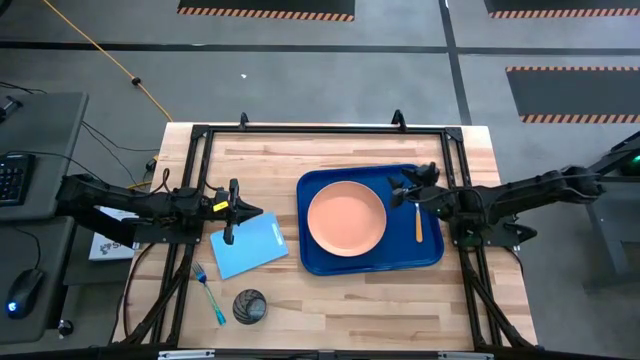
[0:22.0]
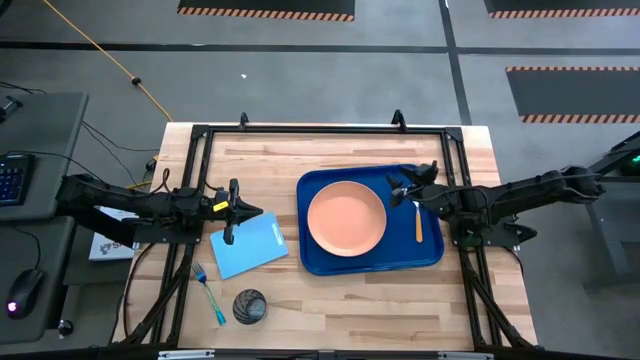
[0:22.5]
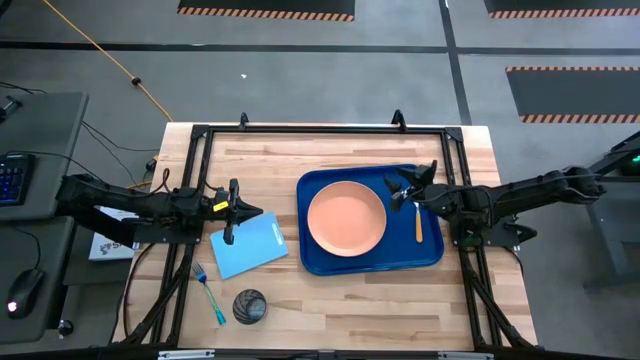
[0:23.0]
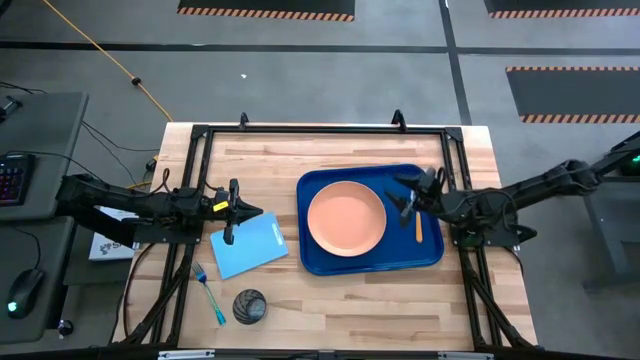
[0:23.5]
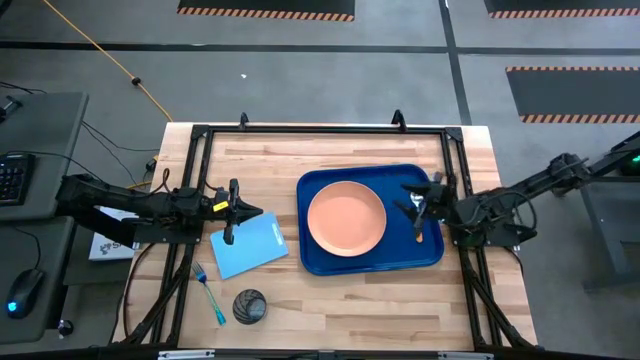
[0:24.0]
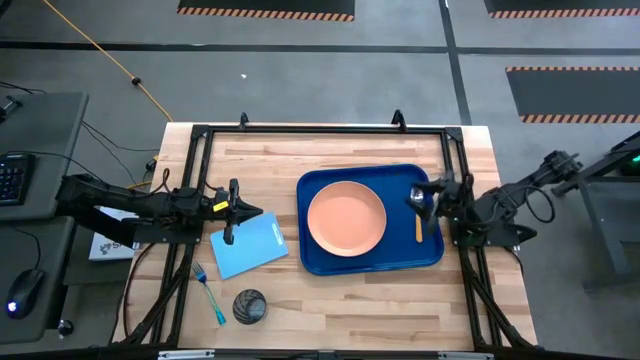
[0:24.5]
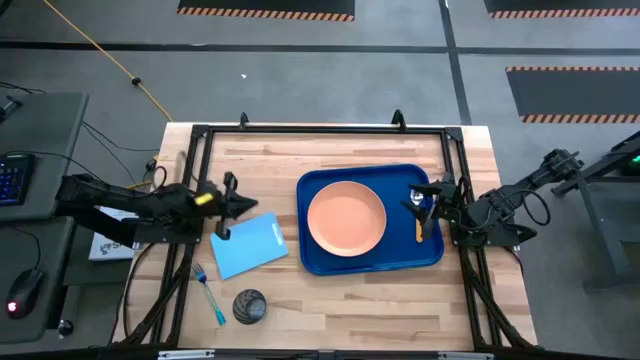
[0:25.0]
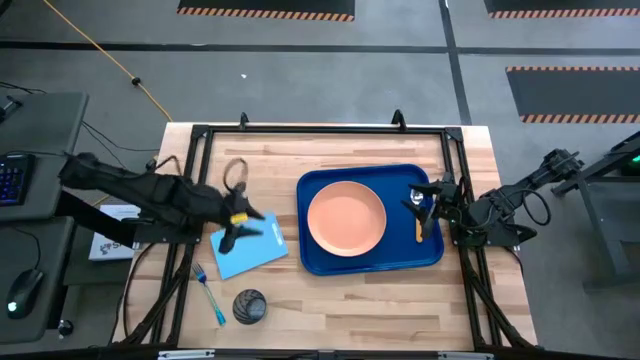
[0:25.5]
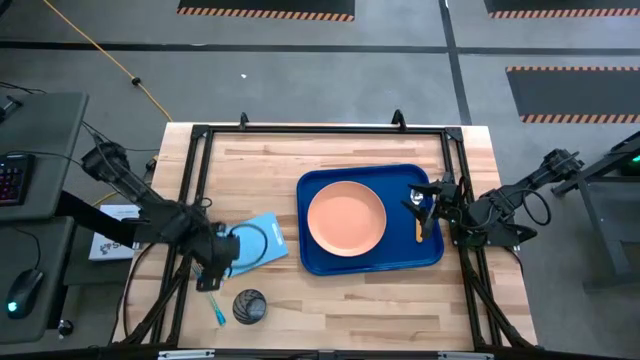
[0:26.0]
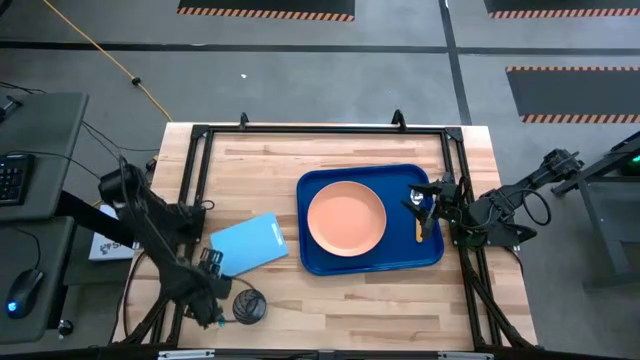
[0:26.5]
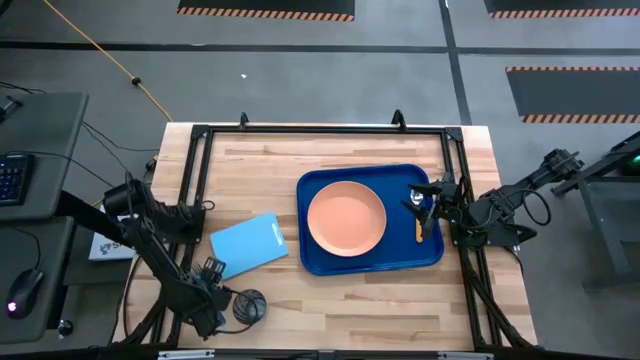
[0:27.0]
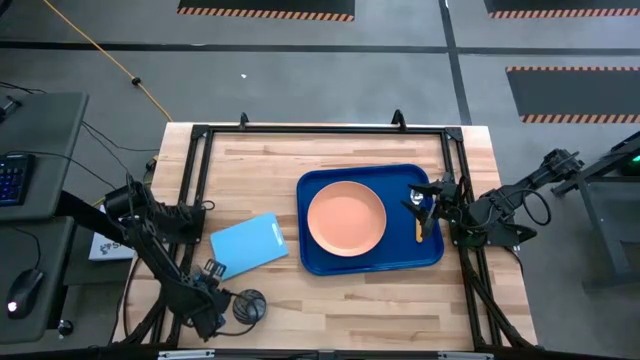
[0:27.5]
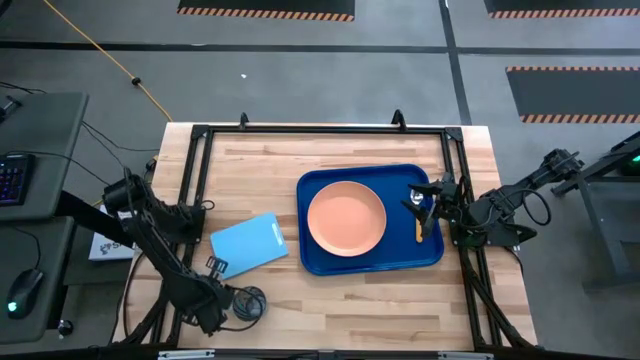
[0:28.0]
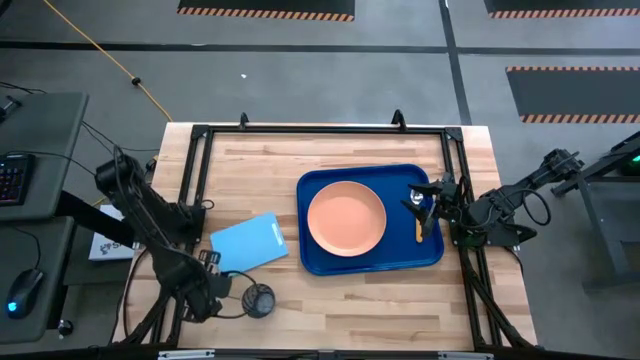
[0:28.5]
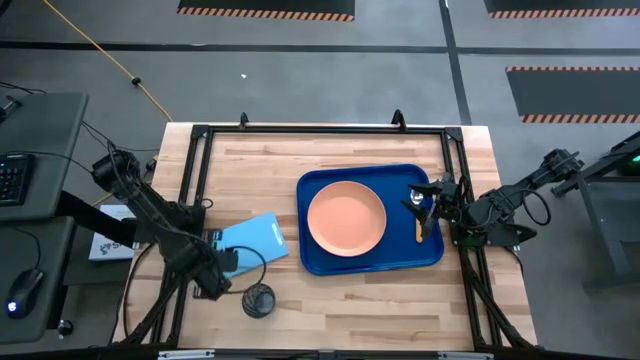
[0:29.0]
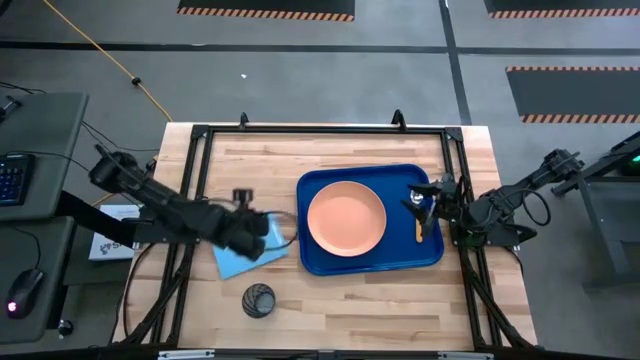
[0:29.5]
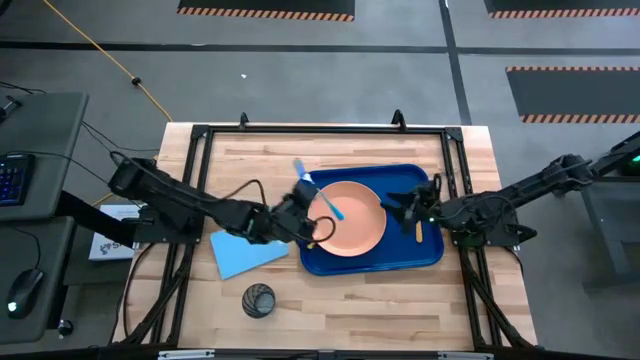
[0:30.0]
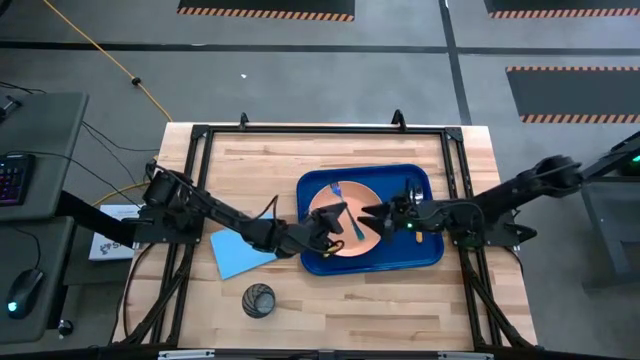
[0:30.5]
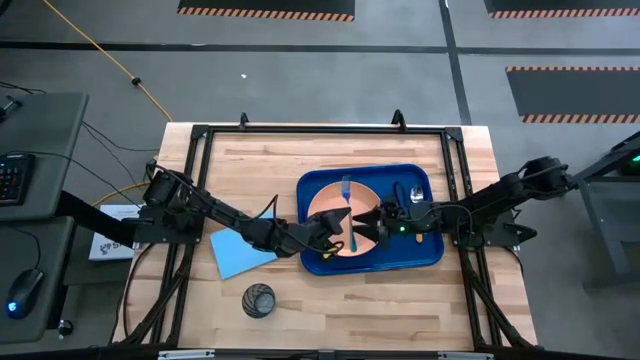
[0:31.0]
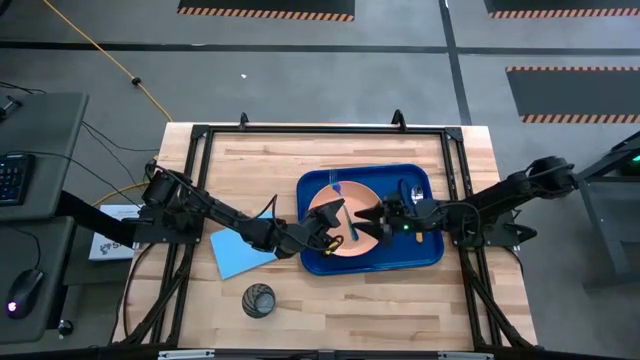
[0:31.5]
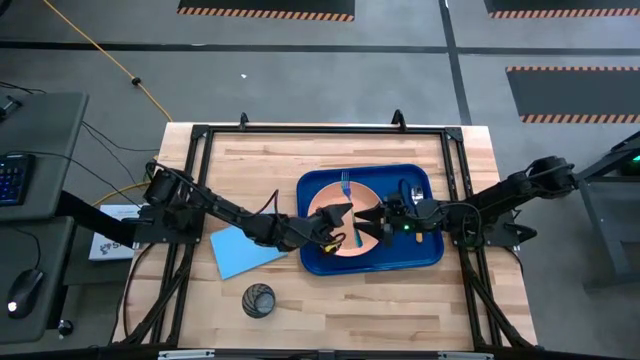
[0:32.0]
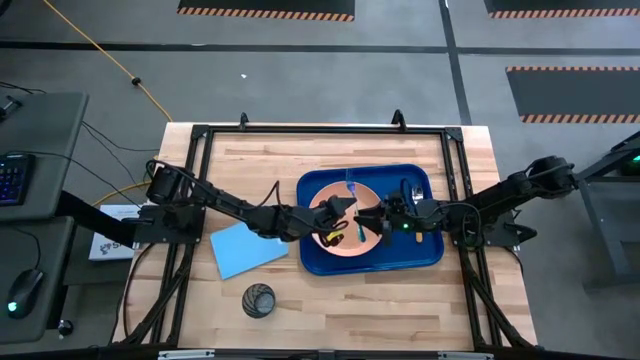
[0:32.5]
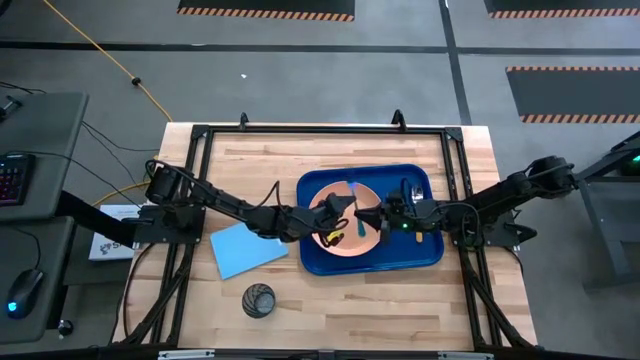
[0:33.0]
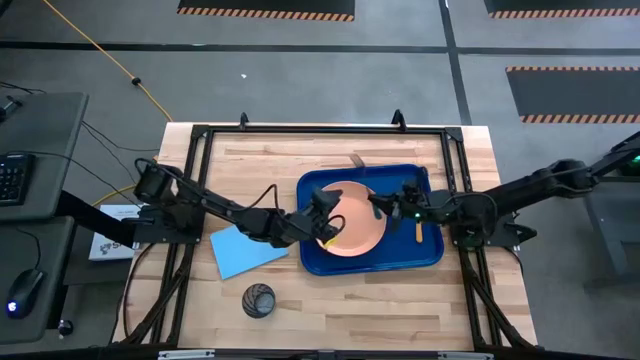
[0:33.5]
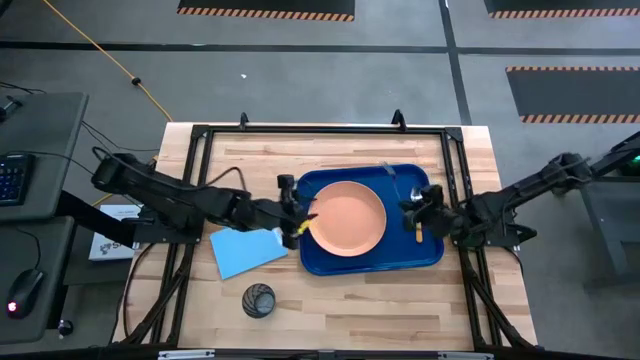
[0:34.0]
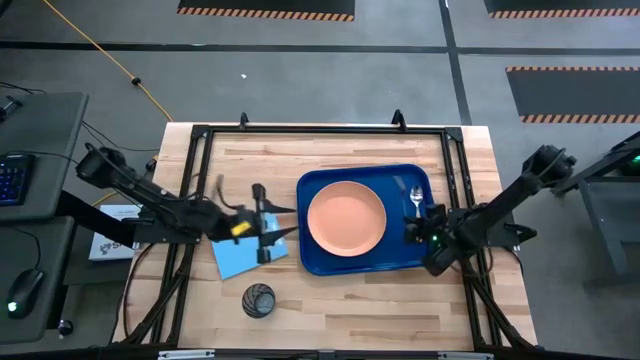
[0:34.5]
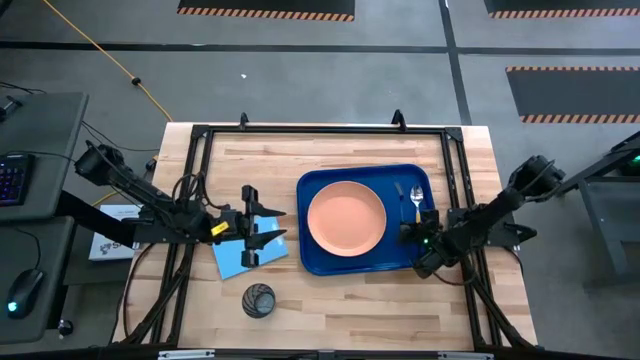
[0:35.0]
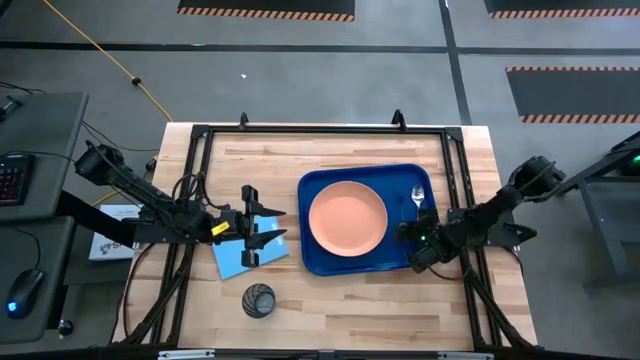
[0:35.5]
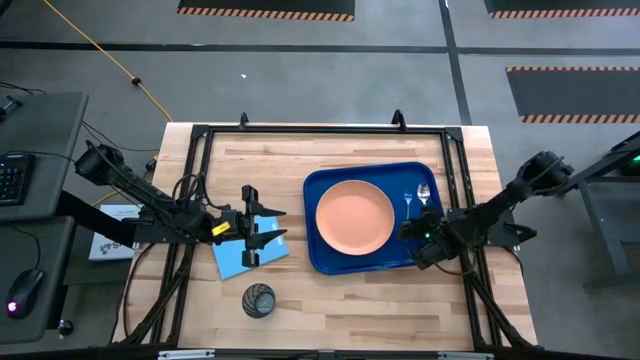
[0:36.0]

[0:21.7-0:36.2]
Task: Pick and place plate/cup/fork/spoon on tray
Put the blue fork on the blue serving tray to the right of the pink plate

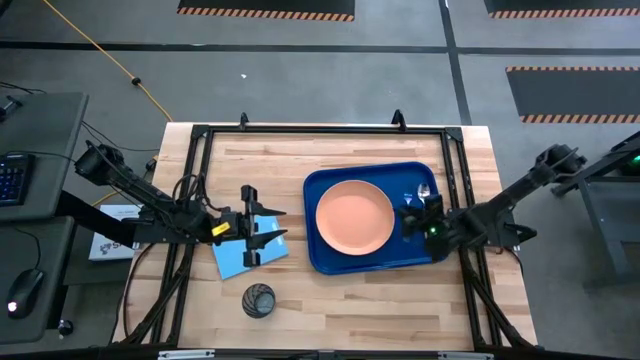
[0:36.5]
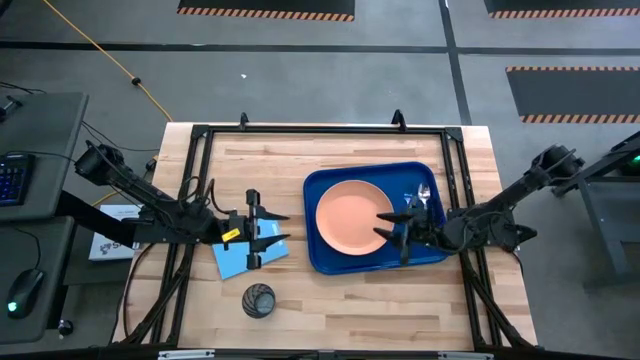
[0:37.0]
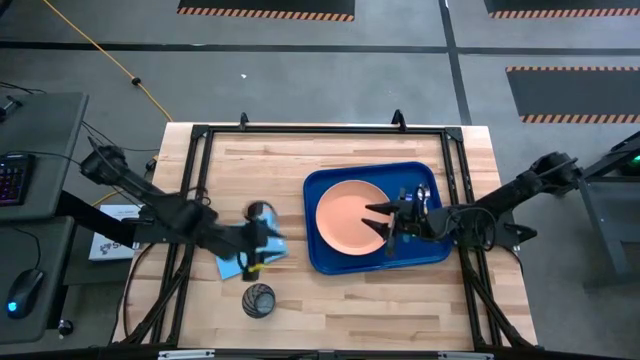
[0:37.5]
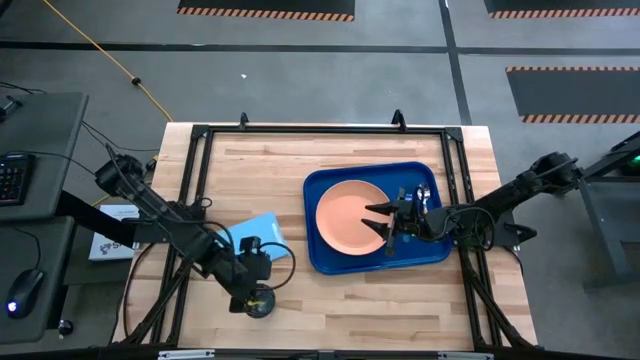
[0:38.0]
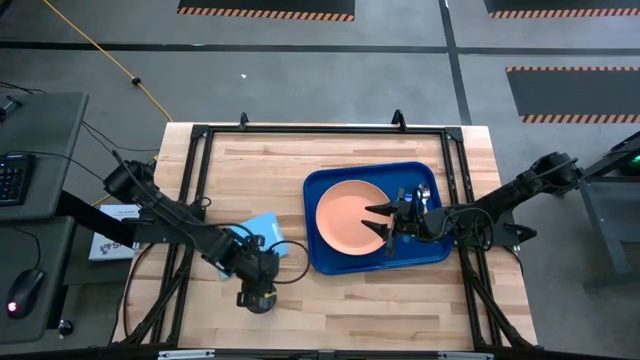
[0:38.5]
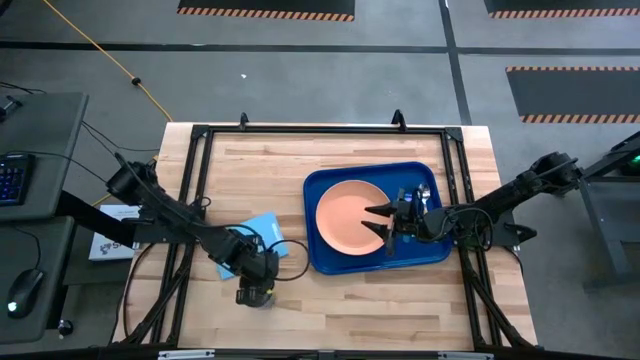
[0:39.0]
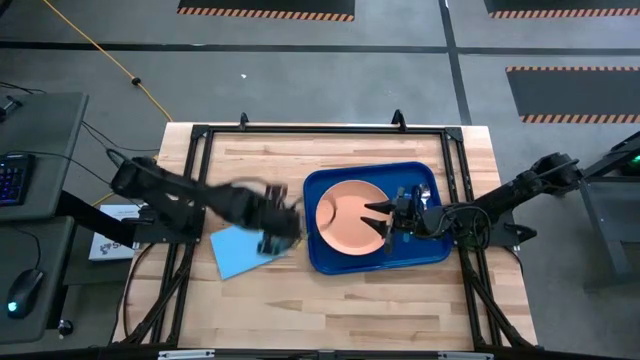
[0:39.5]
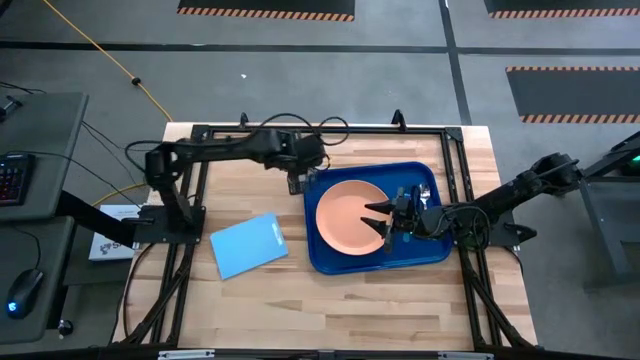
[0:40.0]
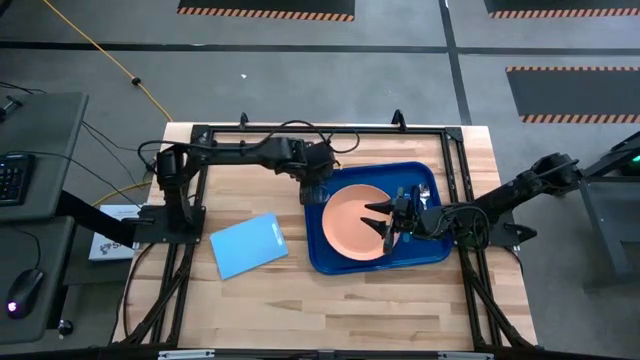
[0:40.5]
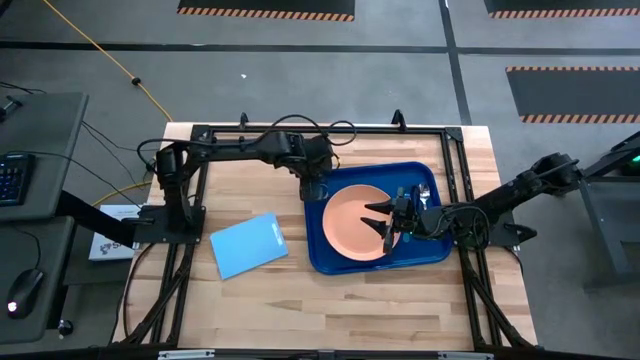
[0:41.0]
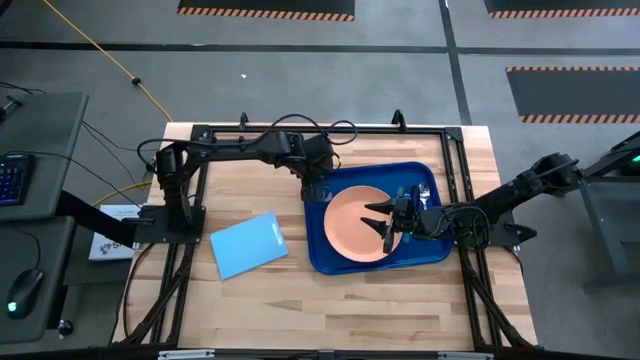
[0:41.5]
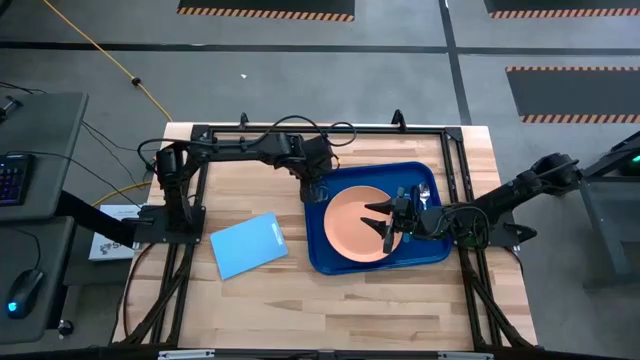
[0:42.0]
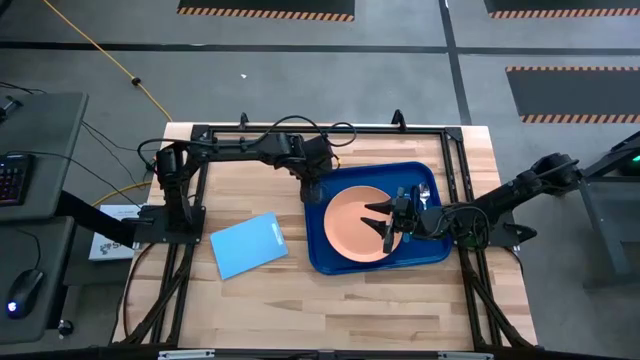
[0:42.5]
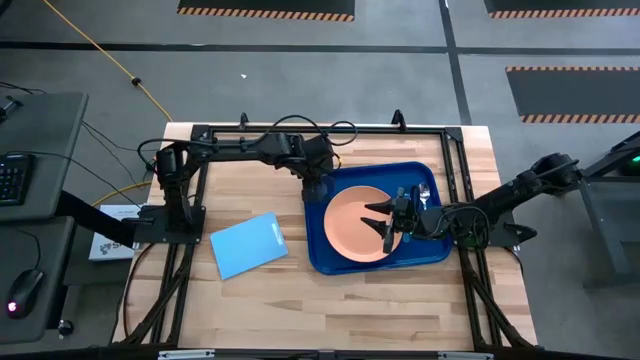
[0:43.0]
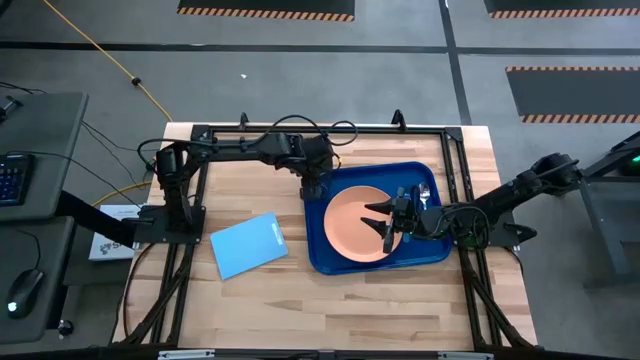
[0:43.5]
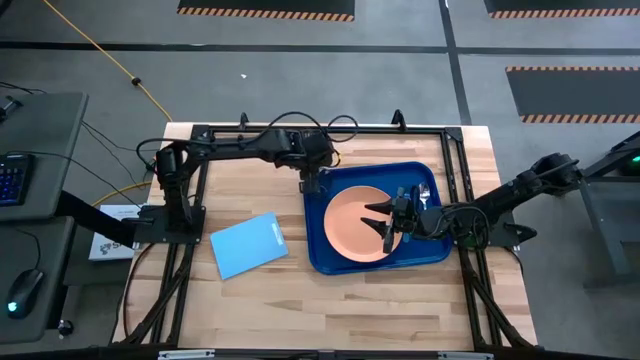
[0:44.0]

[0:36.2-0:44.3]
Put the blue glass on the blue serving tray to the top left of the pink plate
